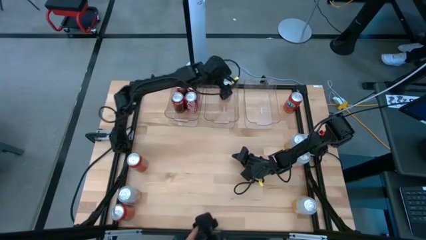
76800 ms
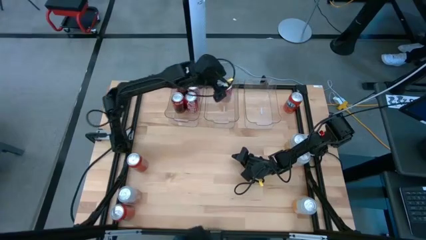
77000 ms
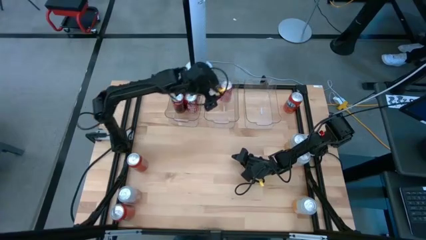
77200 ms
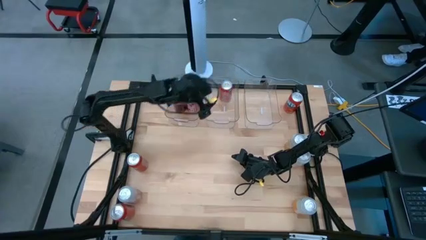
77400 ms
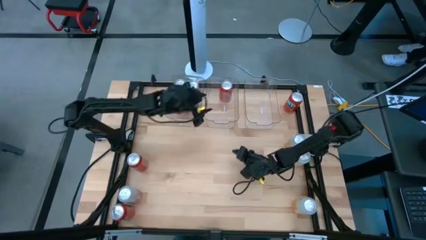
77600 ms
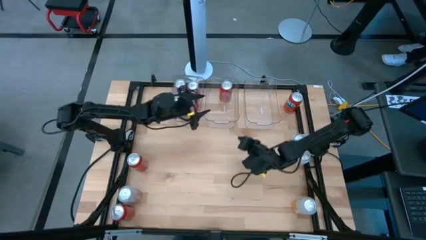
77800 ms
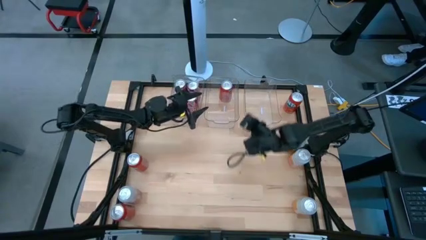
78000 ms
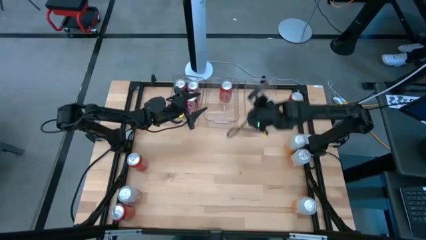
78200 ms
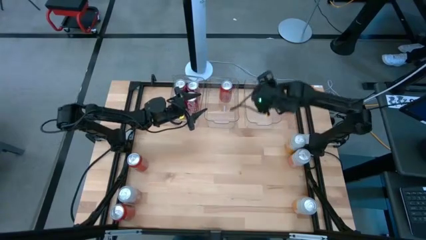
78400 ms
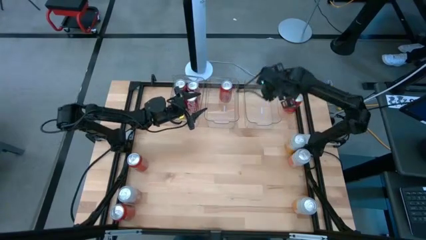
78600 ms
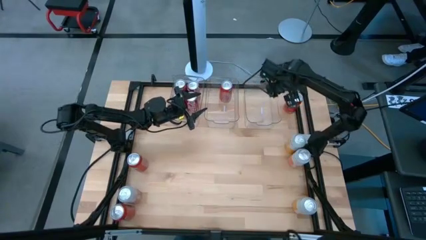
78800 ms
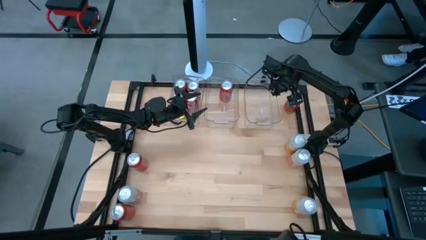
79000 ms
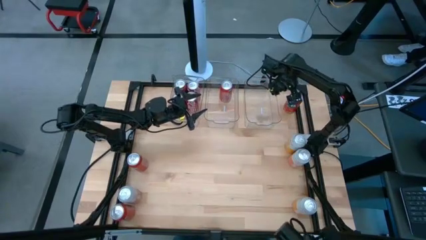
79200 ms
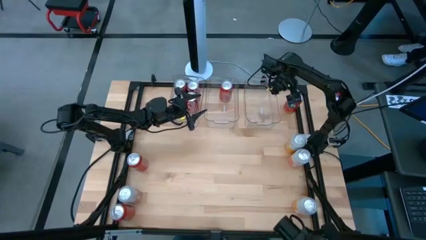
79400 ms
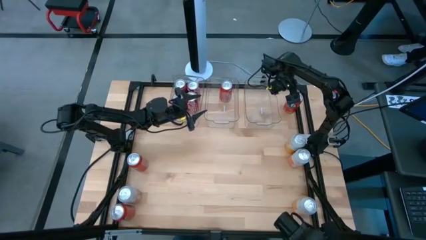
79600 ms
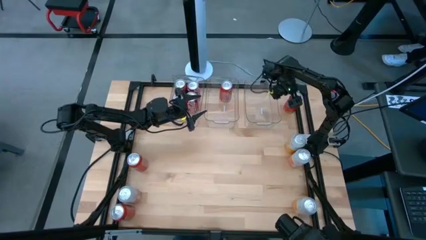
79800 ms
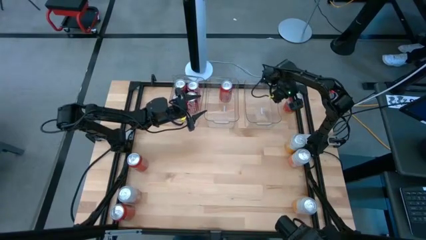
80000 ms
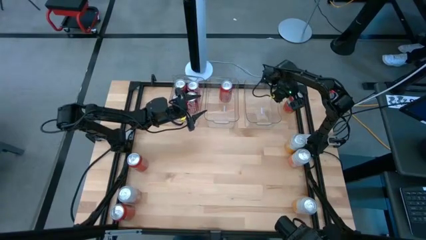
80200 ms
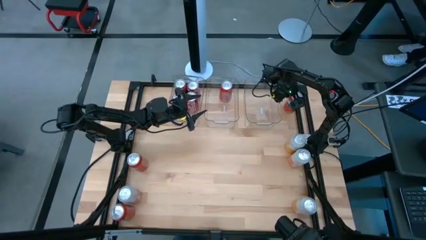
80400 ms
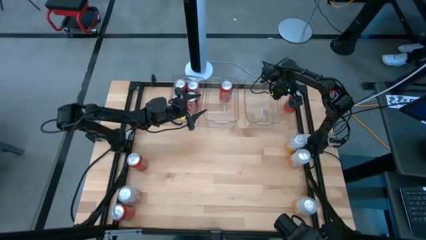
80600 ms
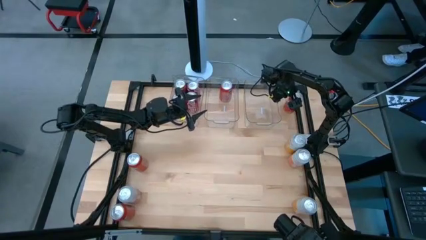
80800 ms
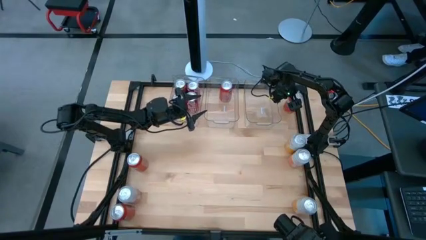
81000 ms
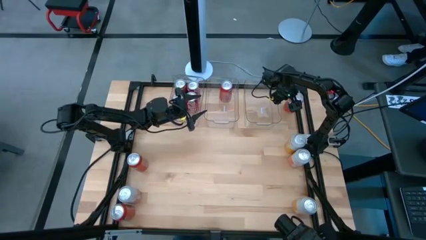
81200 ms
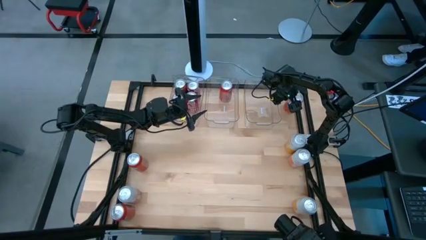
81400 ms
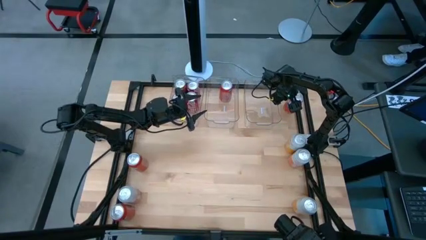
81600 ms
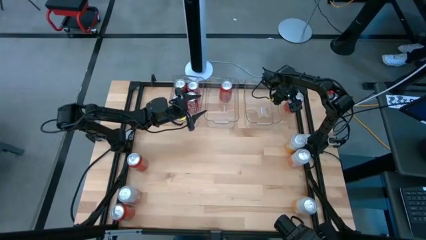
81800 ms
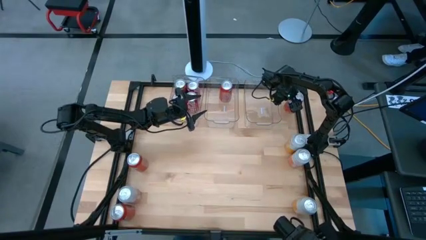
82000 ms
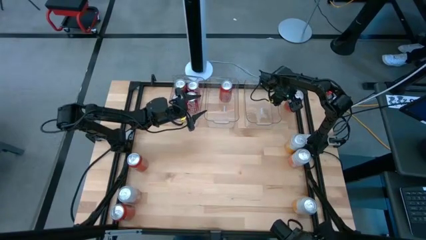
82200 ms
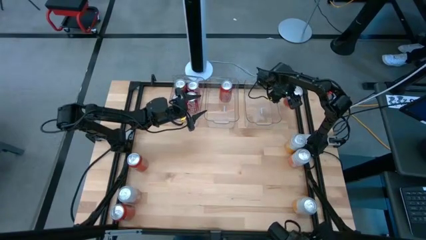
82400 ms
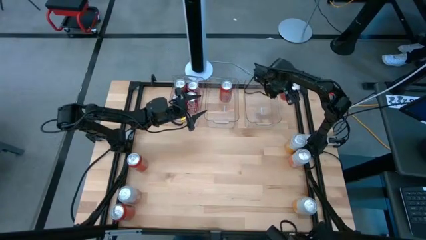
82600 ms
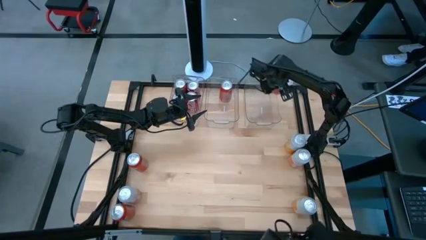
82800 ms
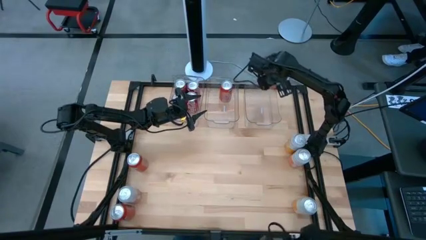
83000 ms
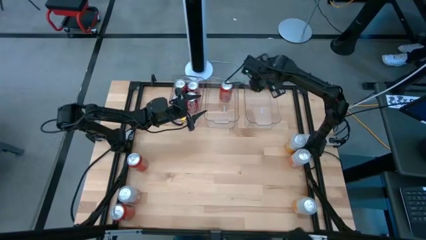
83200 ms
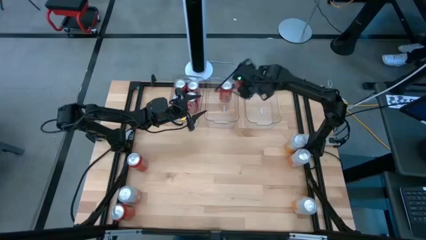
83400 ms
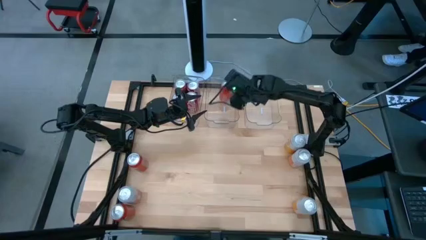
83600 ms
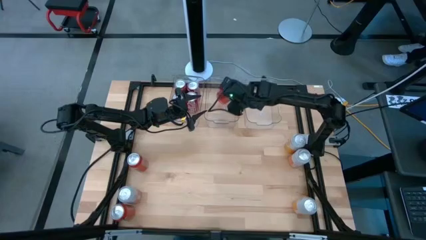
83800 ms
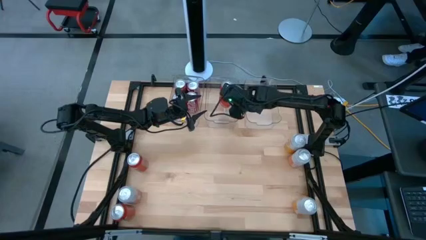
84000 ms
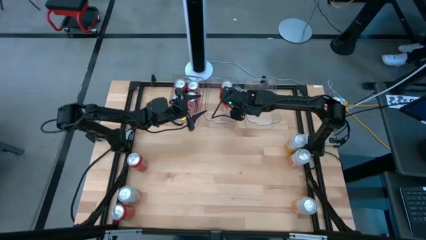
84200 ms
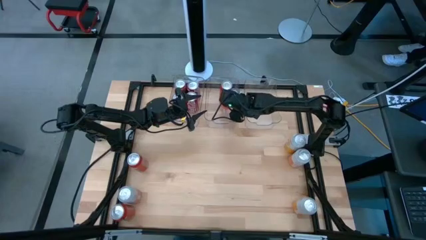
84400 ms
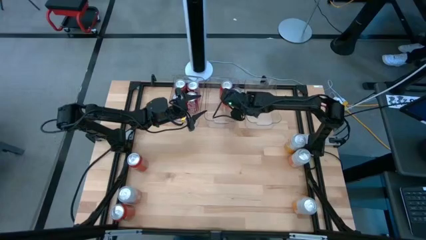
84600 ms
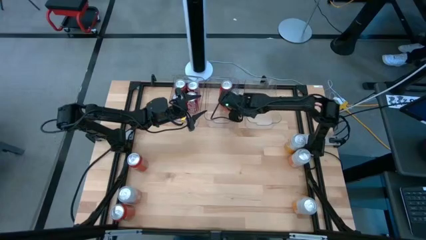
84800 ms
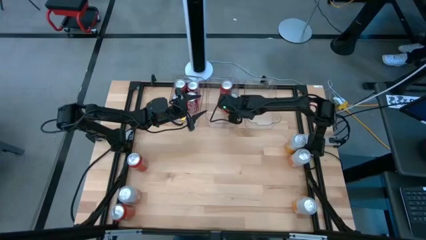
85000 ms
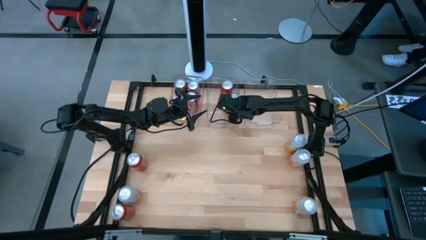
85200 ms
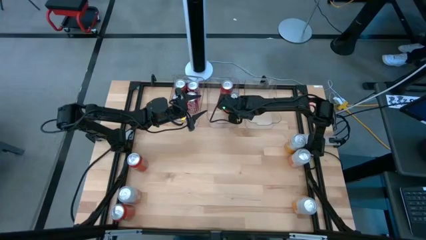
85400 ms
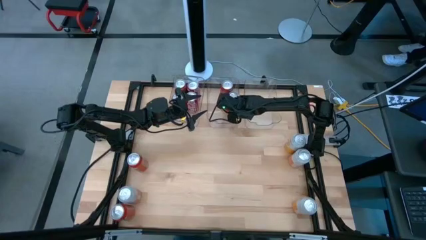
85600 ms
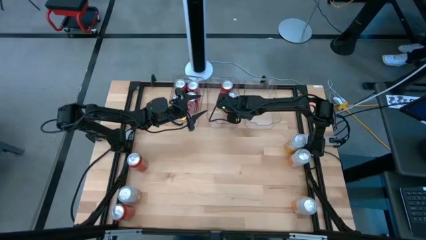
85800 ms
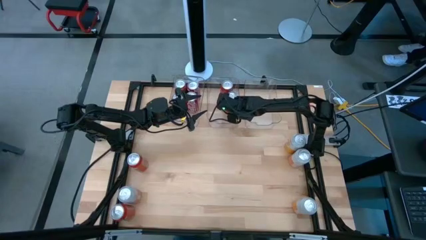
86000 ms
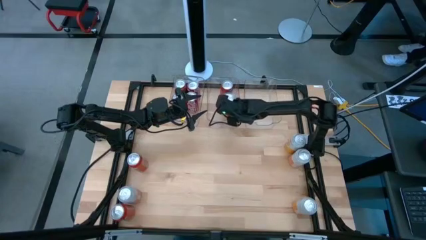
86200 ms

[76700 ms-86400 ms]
Task: Sort soda cans
Put the top right orange soda can into the middle transparent bin

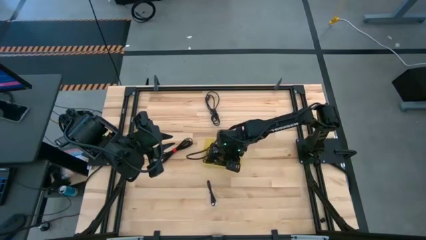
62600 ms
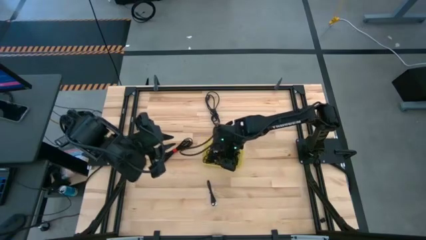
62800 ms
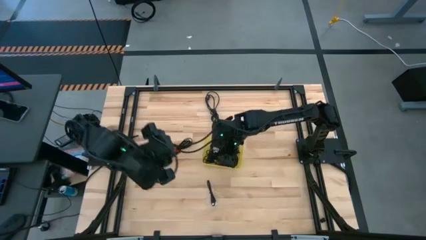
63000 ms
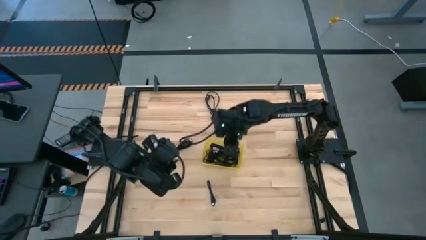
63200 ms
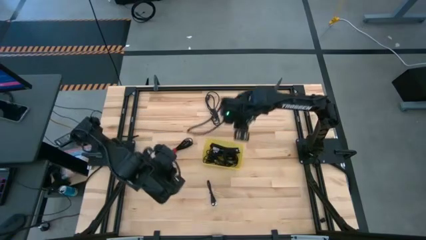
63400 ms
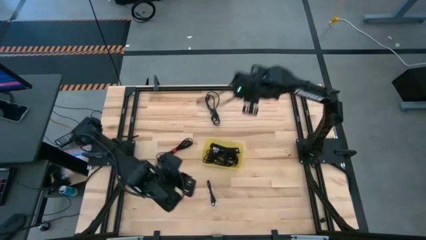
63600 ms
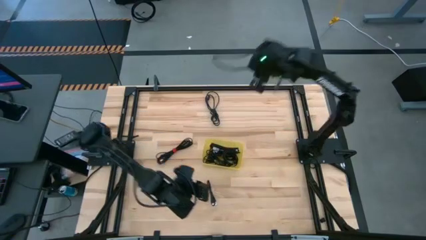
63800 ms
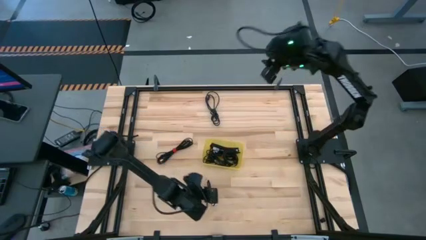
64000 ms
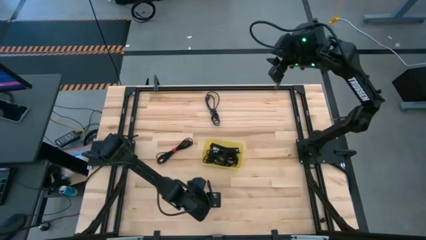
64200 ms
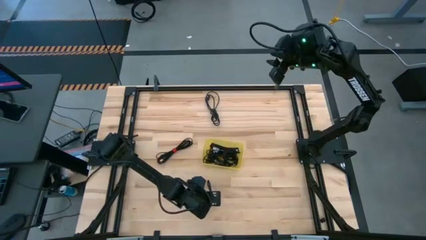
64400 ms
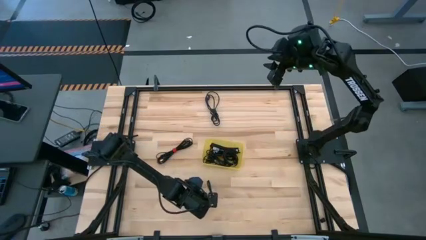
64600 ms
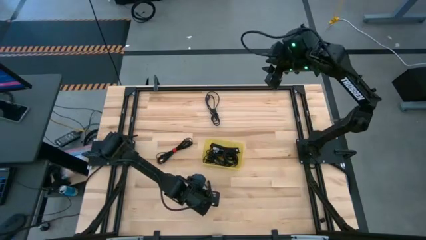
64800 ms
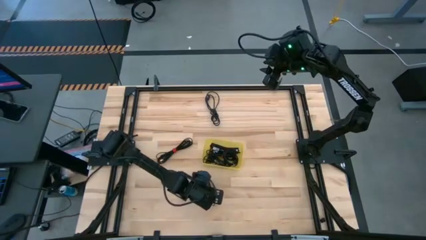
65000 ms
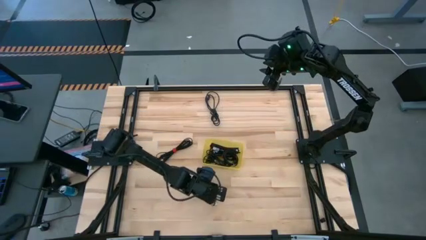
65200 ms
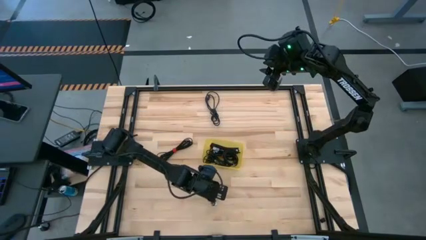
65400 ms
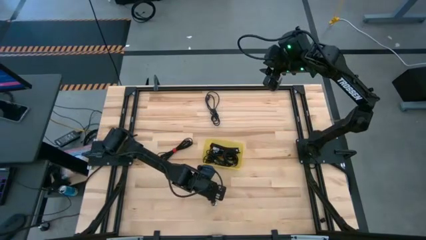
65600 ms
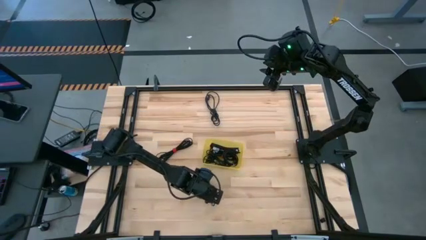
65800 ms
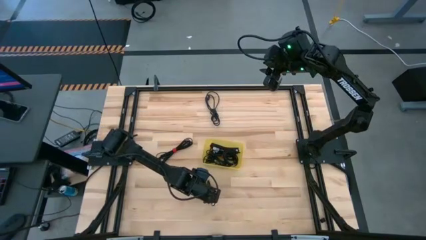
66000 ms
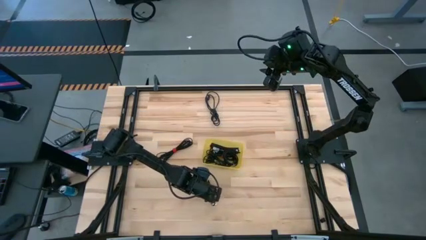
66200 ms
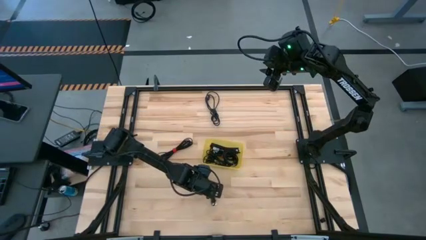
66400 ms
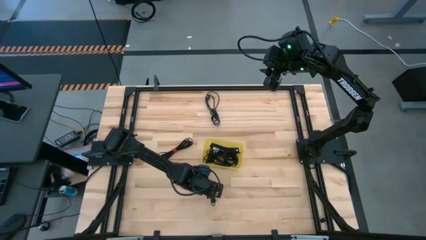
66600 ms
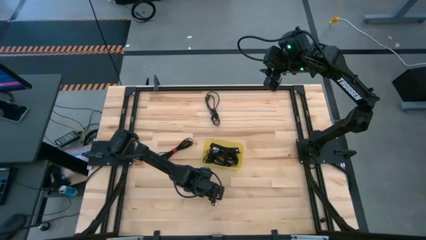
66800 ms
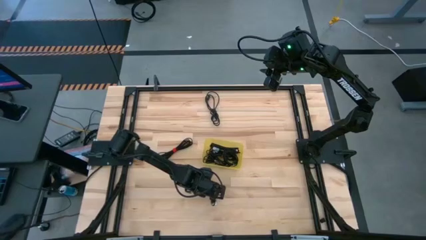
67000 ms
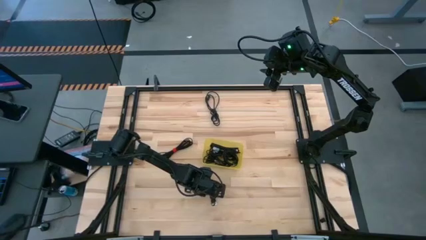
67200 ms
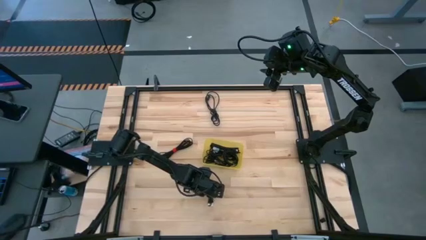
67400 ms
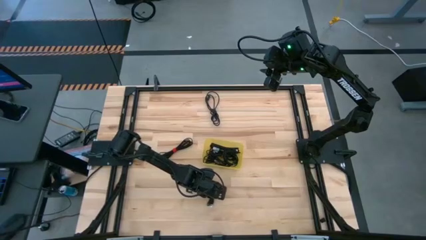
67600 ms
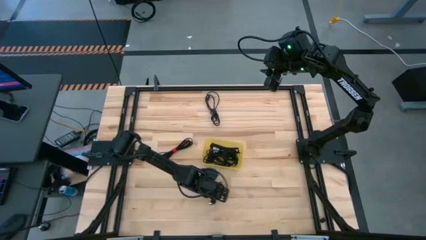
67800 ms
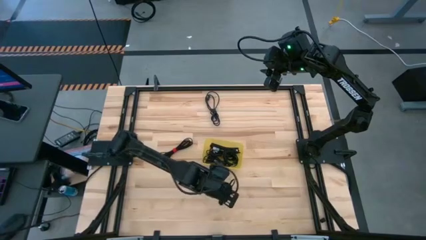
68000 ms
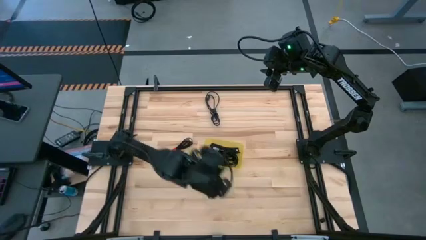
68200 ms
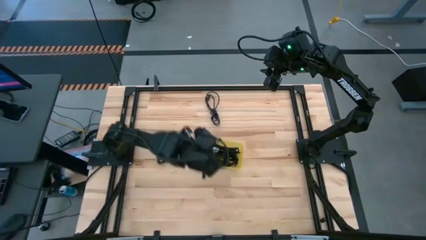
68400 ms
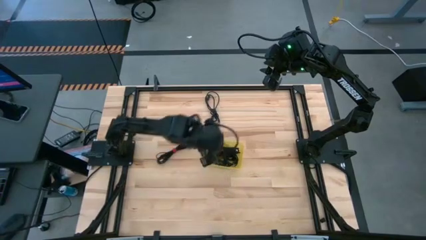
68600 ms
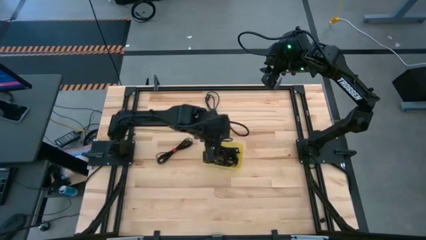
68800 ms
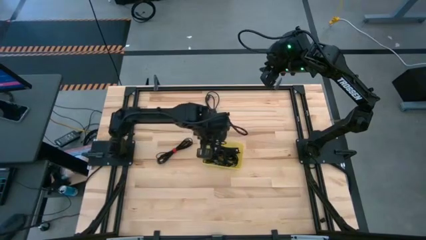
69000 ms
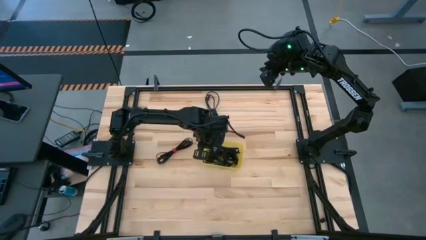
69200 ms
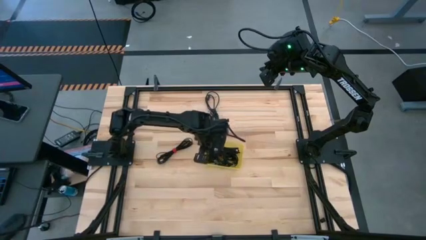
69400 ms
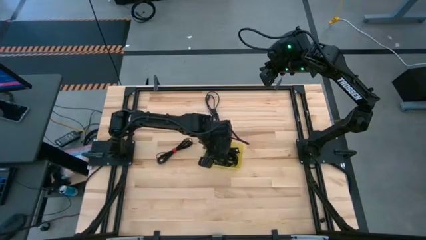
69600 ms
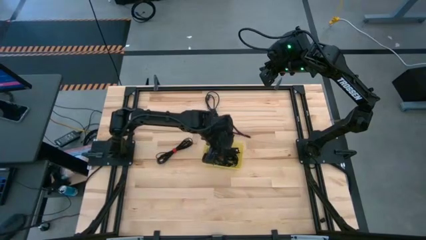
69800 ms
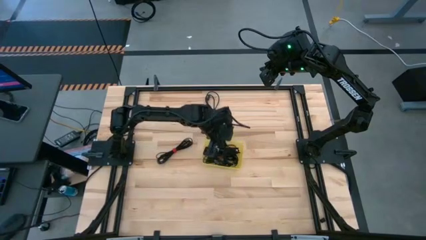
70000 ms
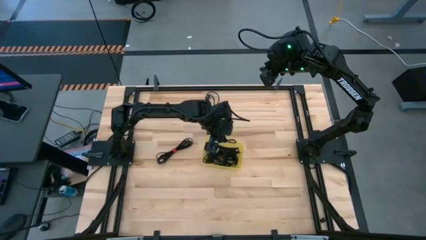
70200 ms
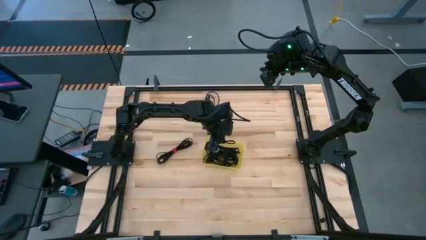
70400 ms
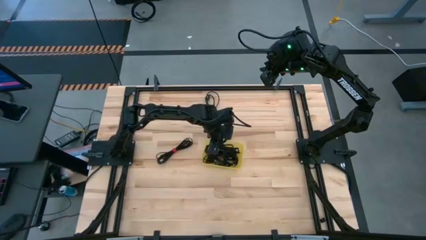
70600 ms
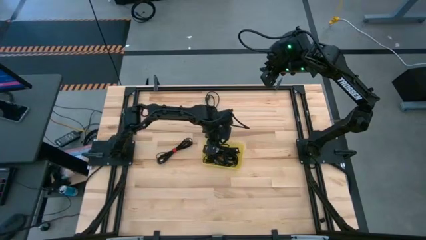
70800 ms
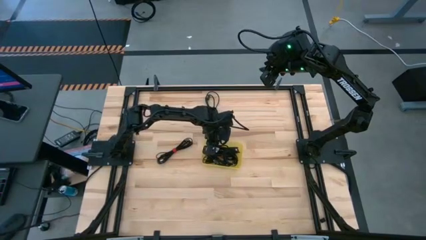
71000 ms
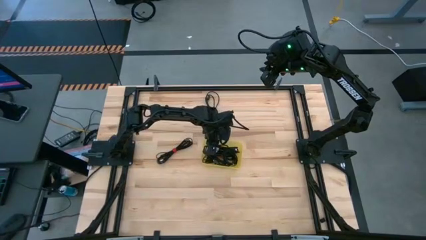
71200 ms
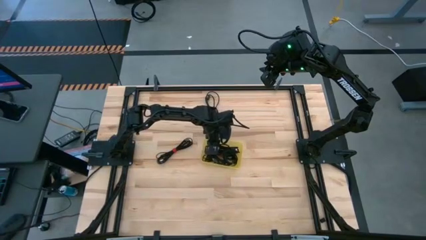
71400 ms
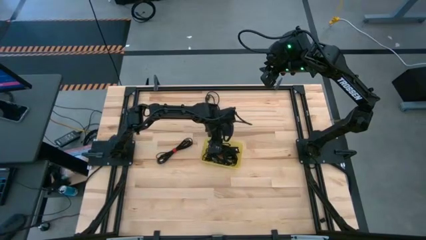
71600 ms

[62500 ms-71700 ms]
Task: Pick and place USB-C Cables
Put the black charger cable into the yellow bin
